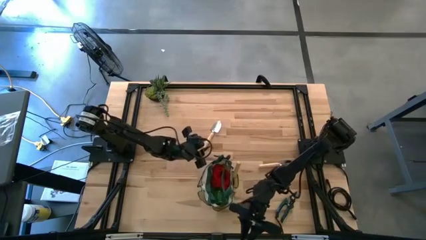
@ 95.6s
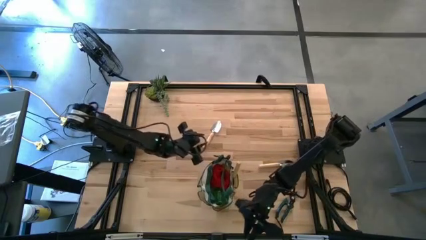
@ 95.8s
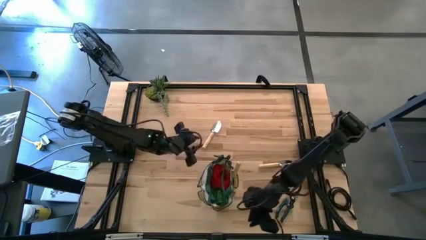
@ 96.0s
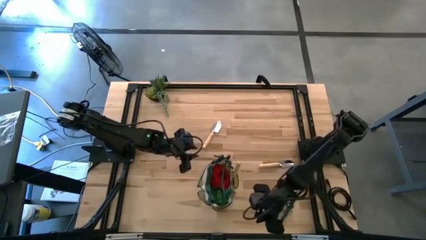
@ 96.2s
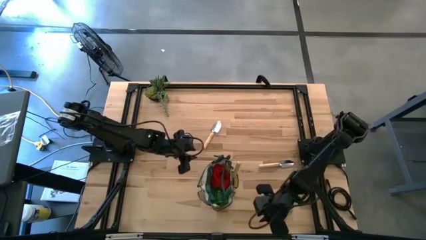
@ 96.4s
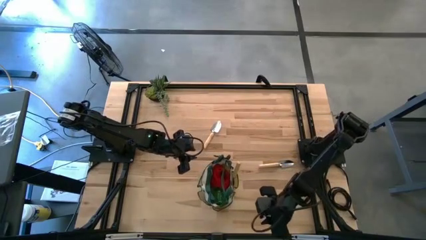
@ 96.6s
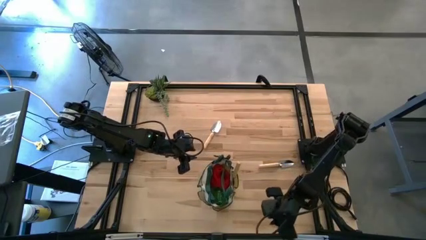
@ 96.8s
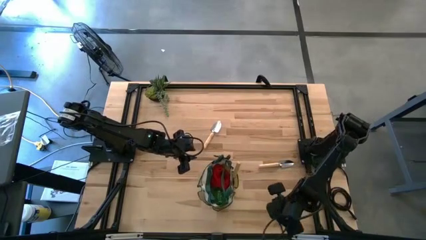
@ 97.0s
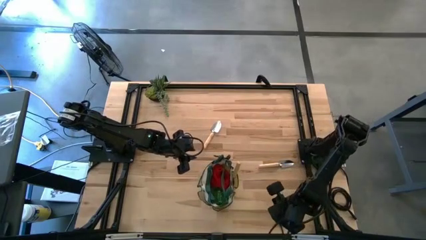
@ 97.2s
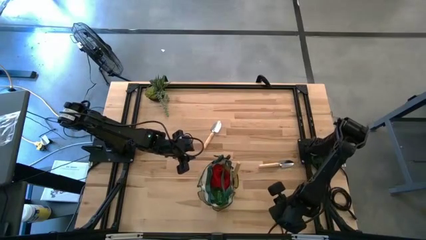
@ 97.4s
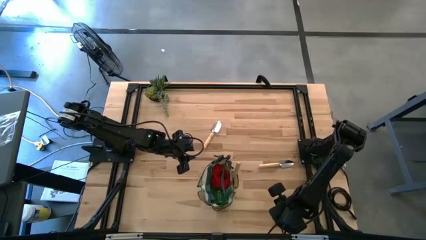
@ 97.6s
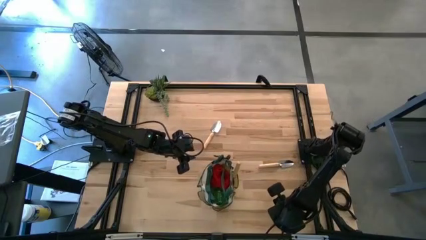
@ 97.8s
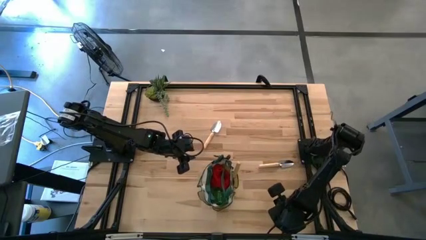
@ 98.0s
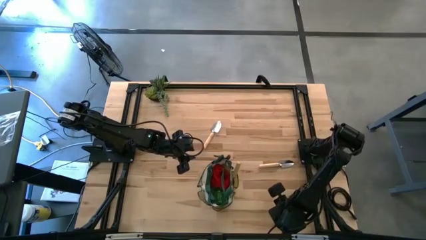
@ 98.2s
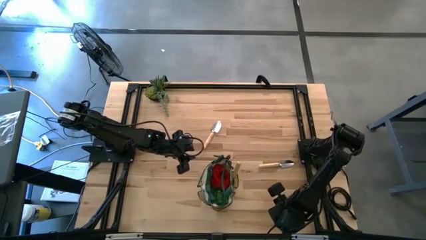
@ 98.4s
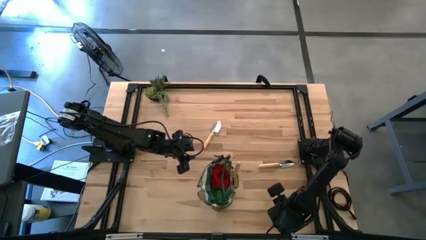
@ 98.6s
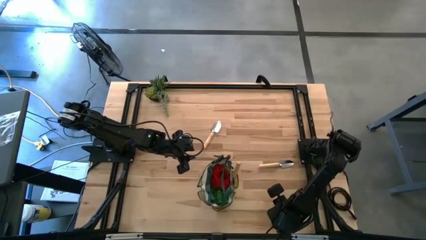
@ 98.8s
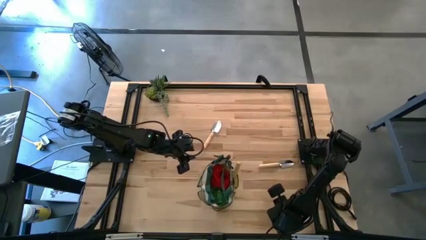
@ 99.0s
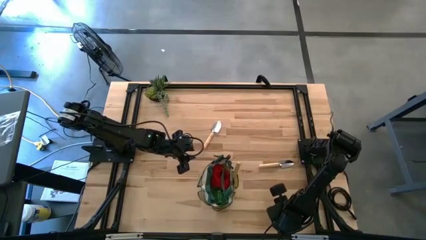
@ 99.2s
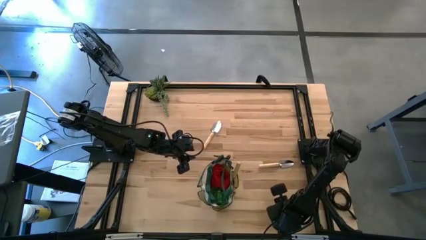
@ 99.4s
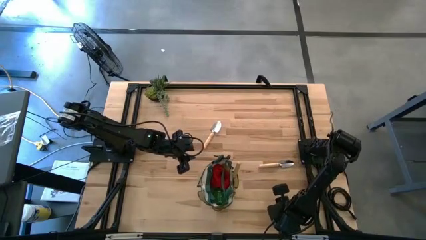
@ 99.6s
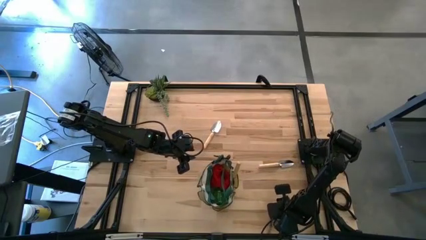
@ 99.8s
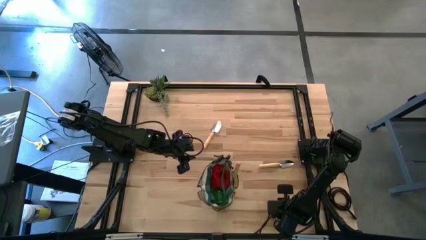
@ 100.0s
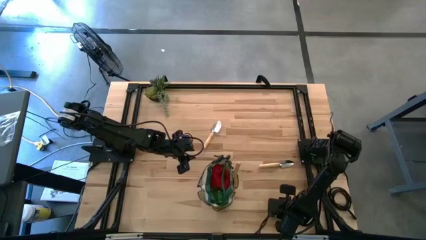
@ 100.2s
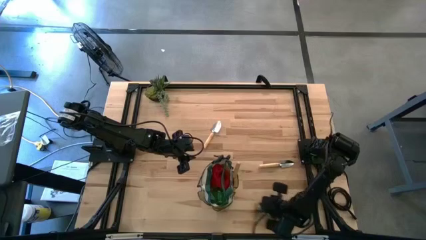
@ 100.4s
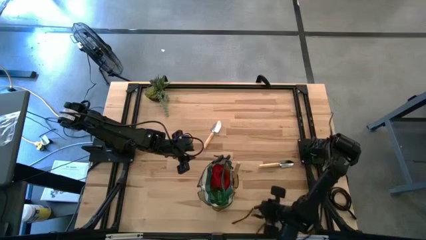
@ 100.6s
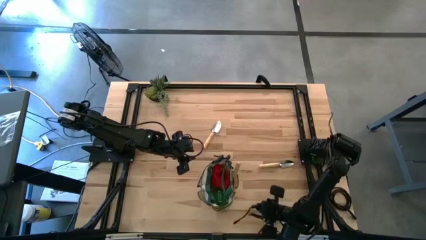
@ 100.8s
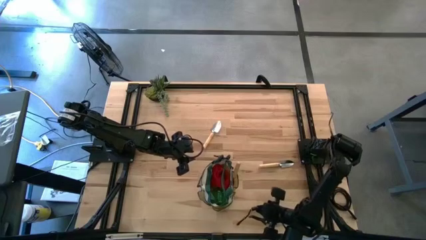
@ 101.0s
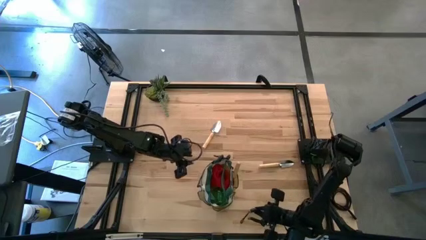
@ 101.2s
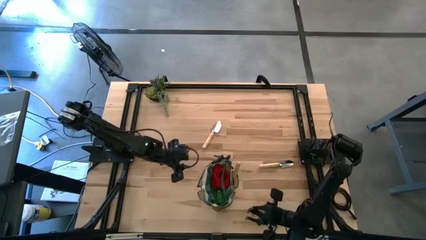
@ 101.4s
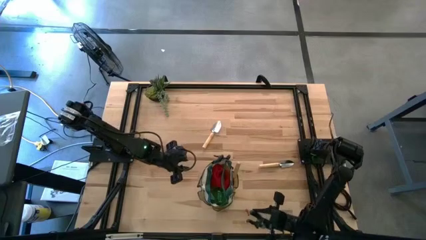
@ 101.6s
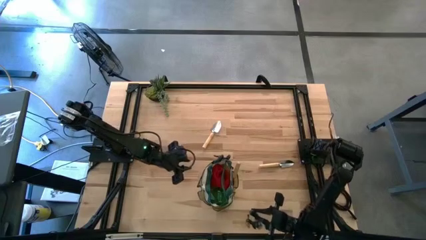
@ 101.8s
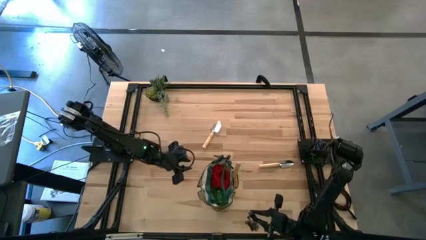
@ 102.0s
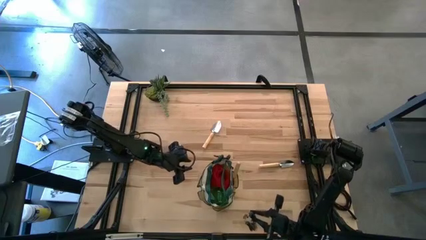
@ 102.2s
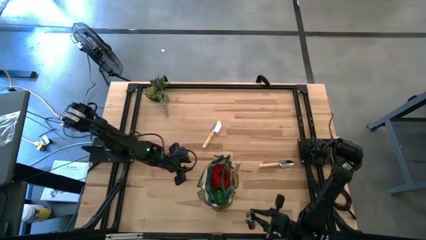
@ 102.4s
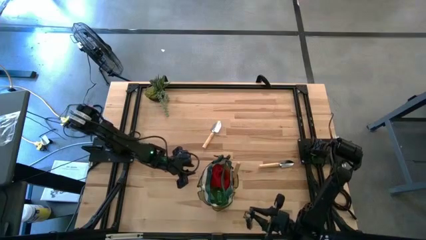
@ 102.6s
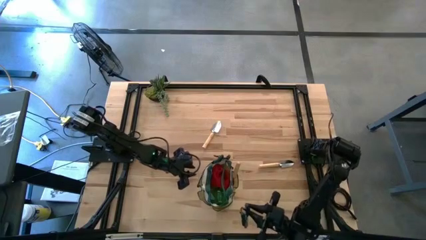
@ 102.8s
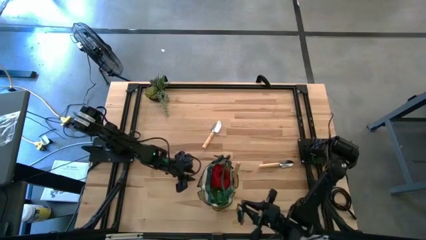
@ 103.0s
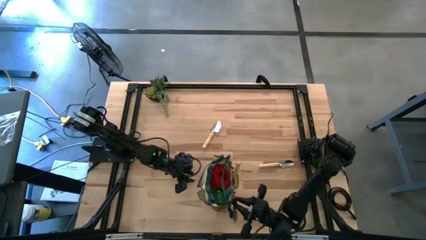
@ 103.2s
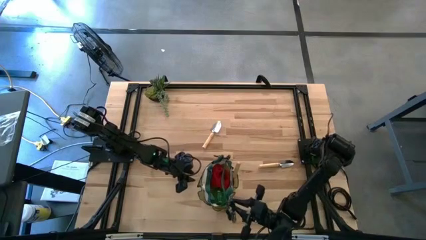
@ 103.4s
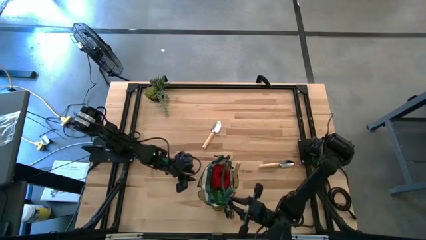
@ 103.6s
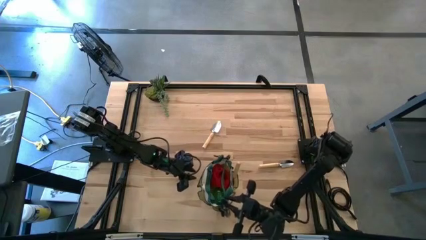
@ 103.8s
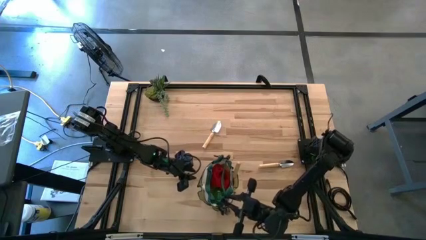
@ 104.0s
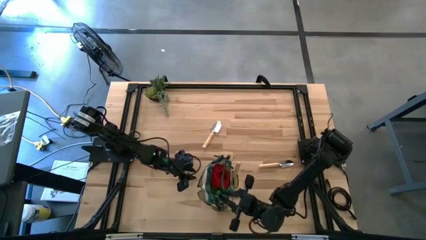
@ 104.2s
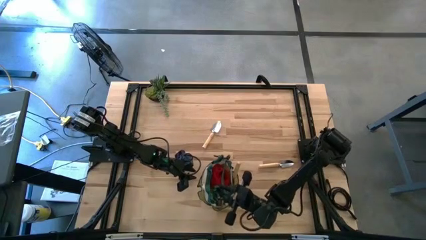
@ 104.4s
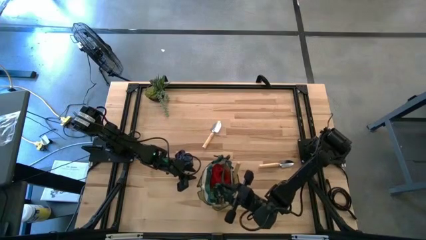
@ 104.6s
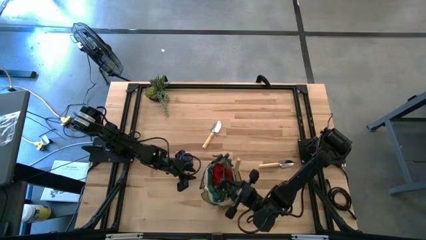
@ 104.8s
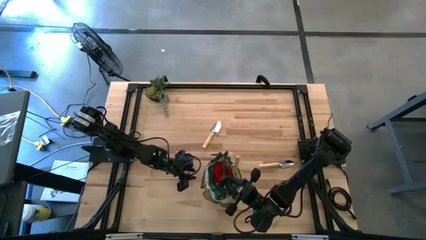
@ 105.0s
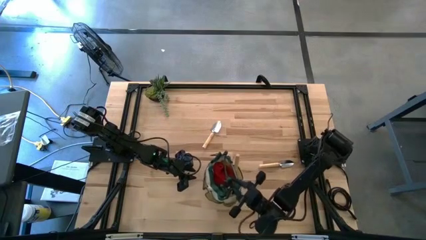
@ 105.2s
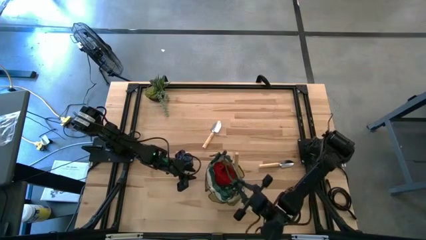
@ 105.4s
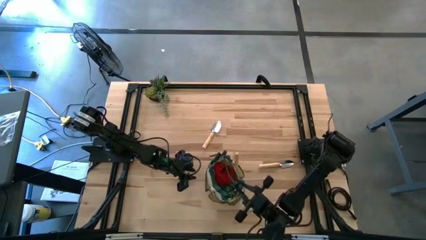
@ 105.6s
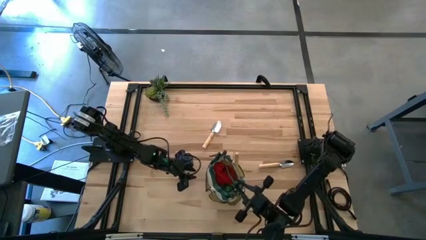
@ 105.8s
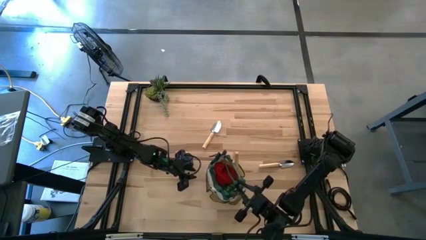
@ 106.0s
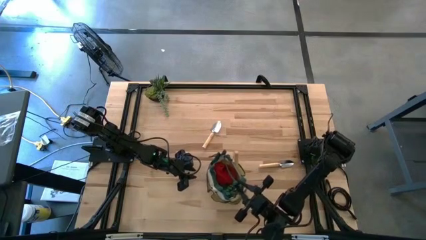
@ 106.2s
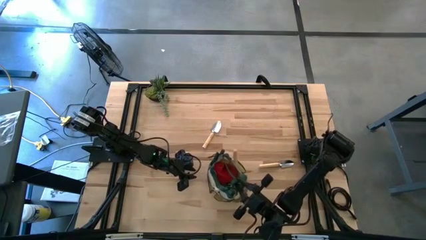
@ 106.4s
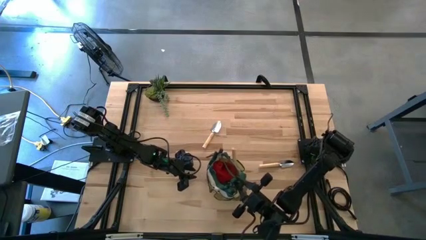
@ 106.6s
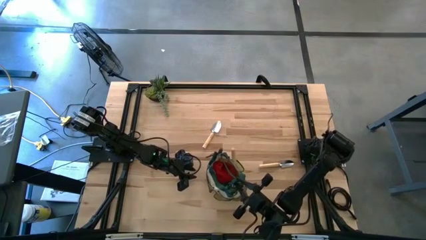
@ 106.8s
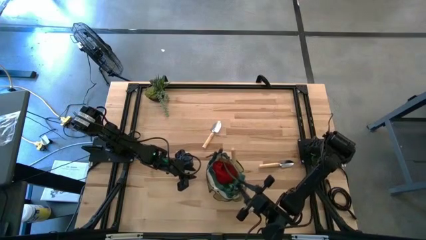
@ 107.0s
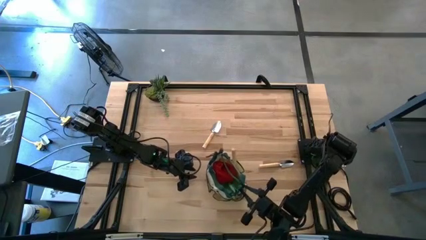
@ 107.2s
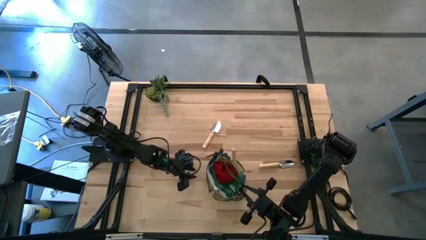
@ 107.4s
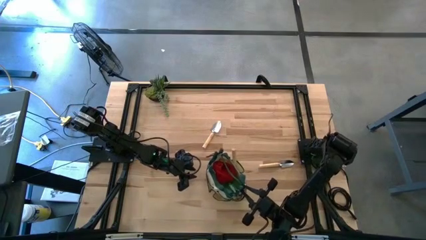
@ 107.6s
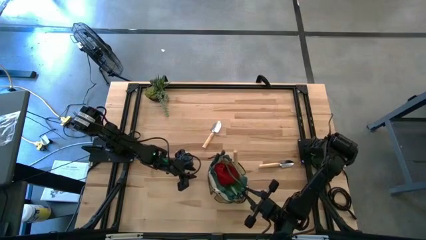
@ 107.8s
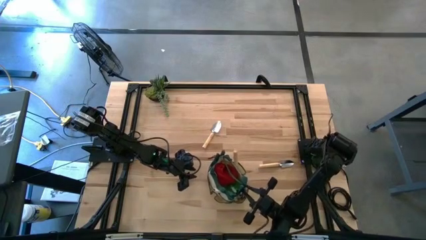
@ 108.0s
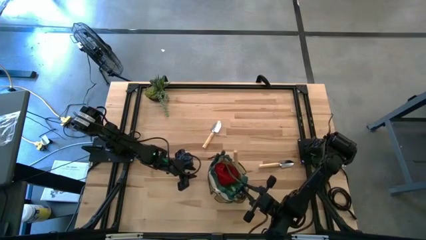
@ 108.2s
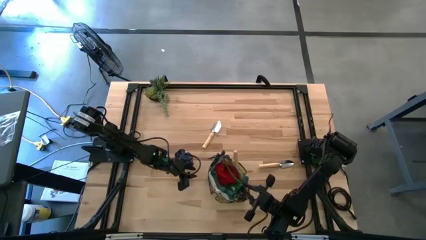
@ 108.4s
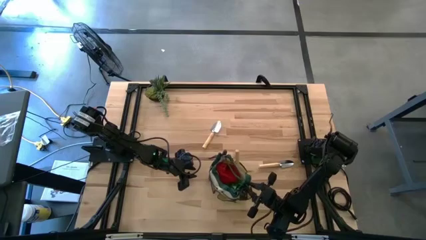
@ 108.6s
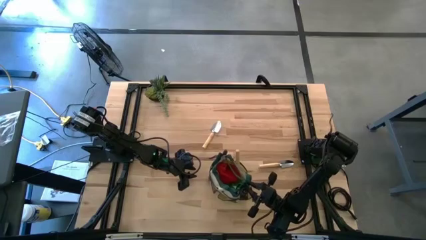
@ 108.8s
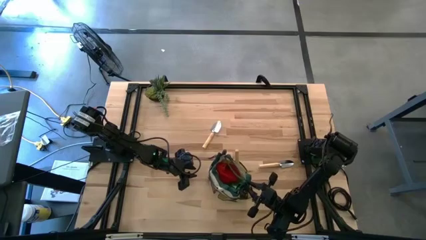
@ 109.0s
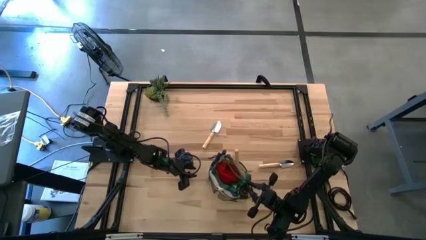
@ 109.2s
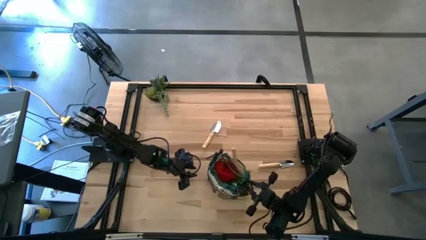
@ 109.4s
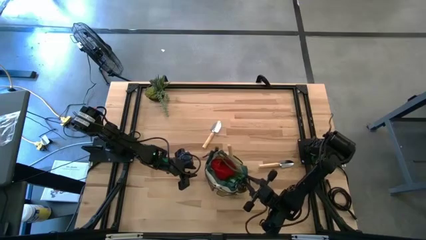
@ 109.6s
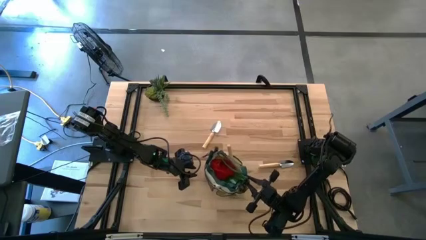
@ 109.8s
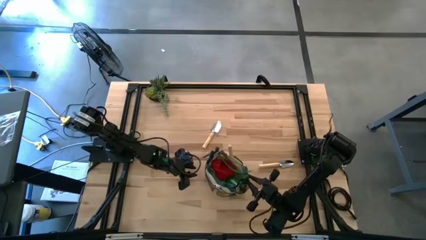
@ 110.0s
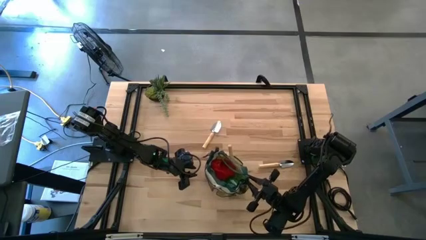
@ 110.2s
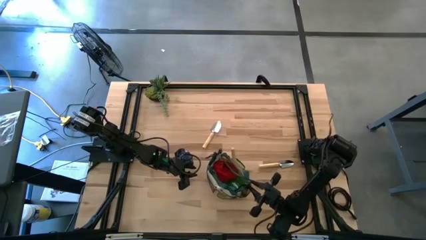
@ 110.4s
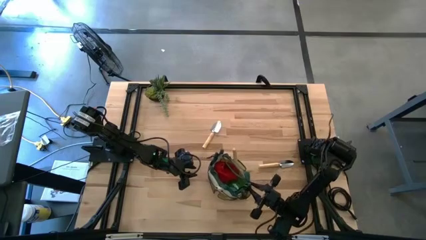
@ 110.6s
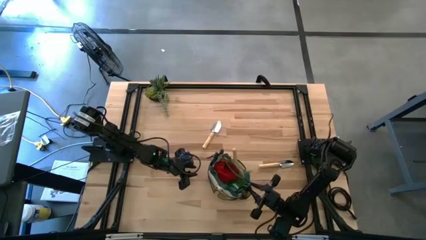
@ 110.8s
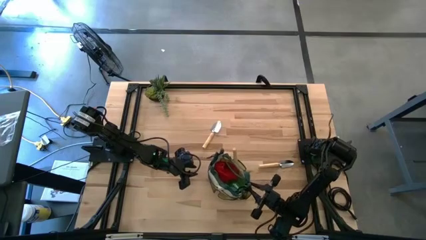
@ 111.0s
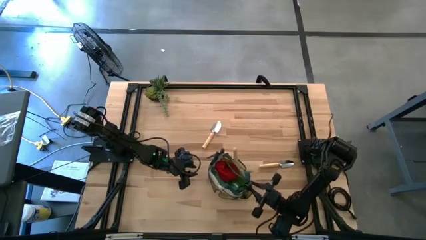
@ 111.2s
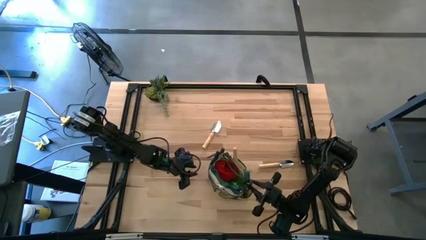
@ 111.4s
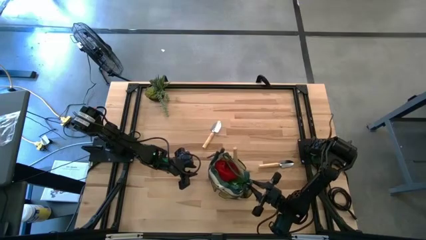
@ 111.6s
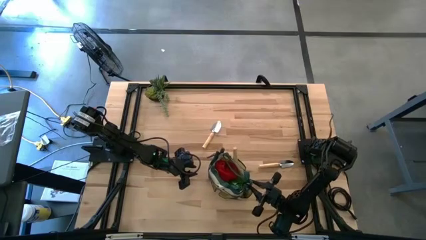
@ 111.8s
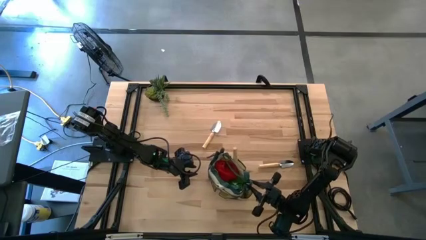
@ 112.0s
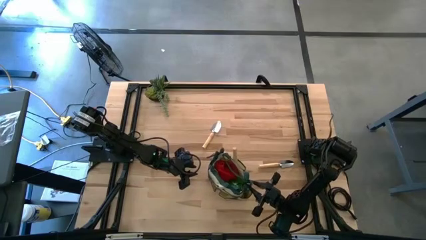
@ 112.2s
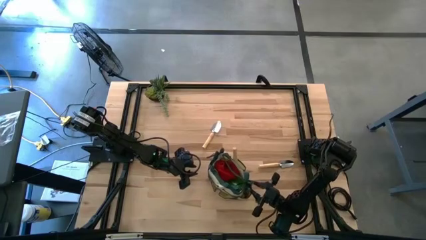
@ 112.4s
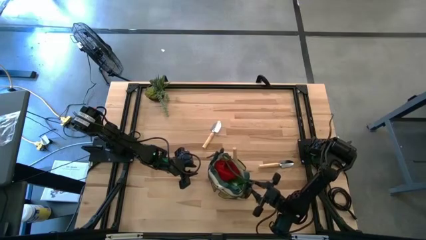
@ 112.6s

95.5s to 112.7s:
Task: Pick & Place Garden tools in Gardening bag
Put the green shear scissors into the light brown gardening bag
